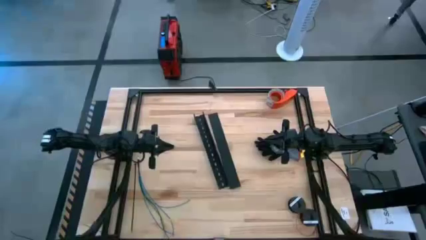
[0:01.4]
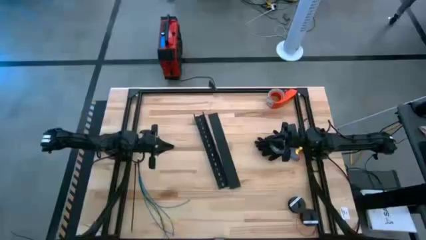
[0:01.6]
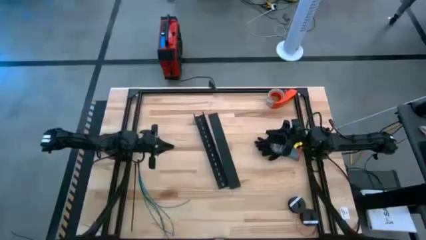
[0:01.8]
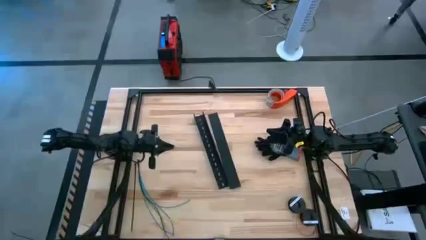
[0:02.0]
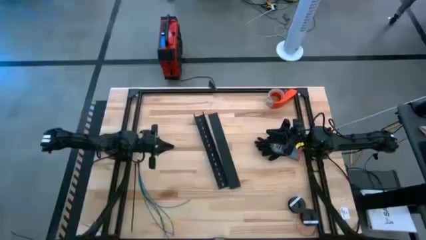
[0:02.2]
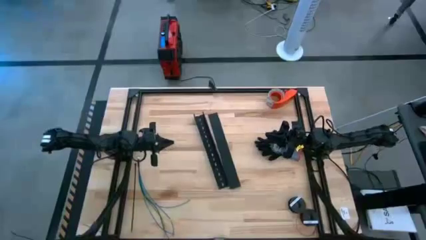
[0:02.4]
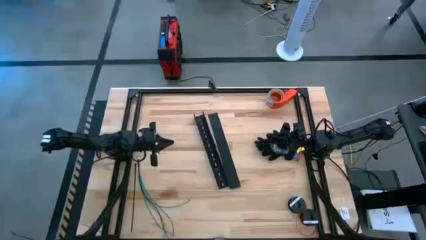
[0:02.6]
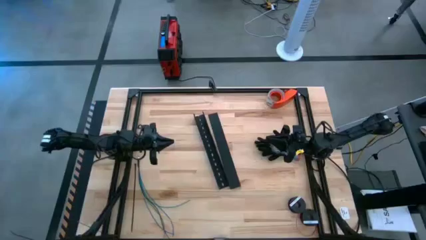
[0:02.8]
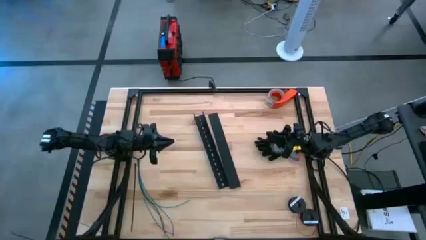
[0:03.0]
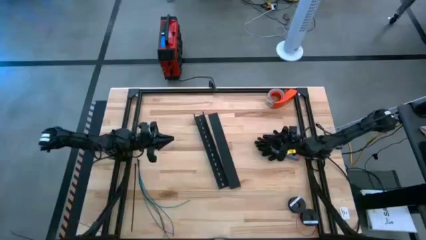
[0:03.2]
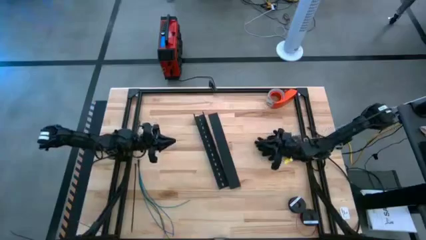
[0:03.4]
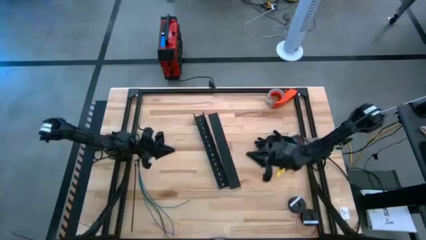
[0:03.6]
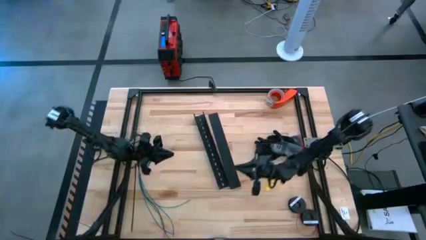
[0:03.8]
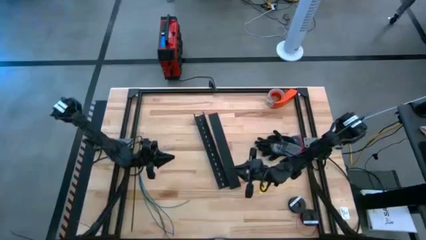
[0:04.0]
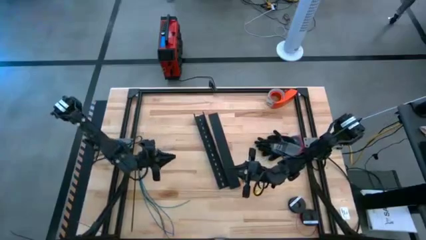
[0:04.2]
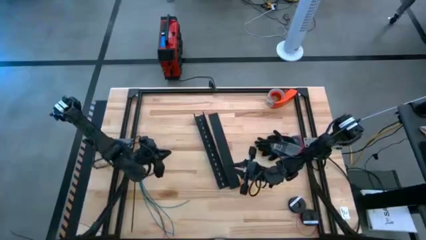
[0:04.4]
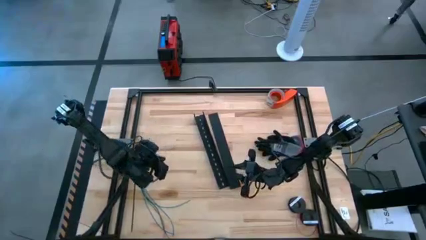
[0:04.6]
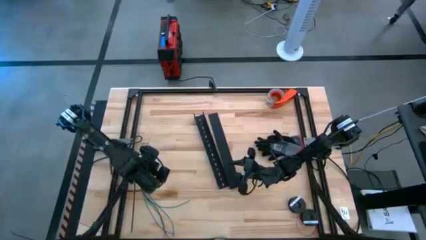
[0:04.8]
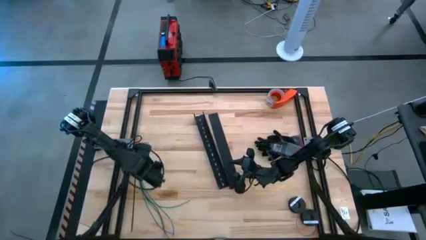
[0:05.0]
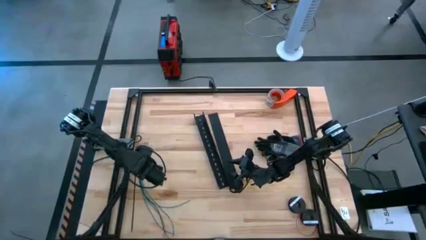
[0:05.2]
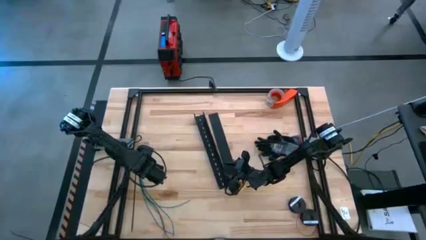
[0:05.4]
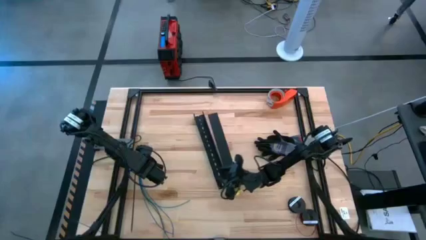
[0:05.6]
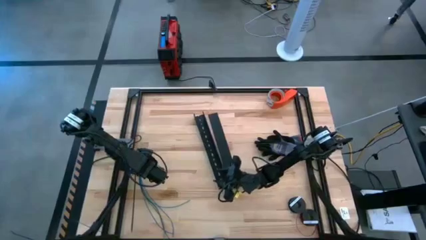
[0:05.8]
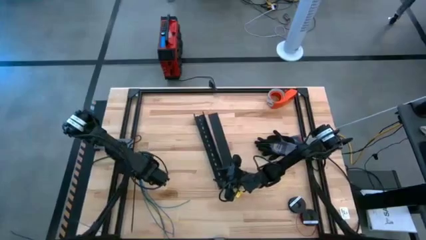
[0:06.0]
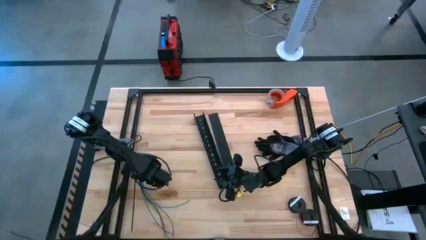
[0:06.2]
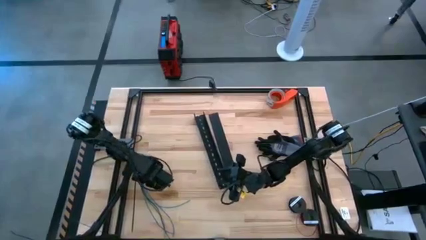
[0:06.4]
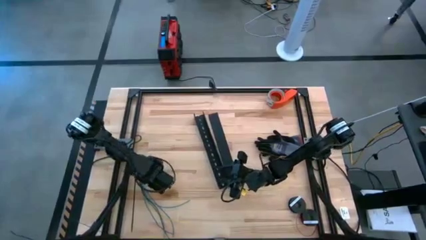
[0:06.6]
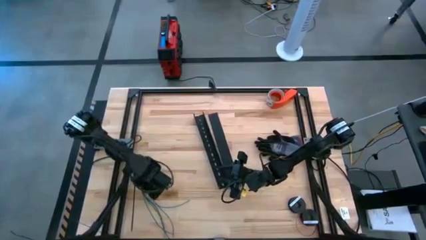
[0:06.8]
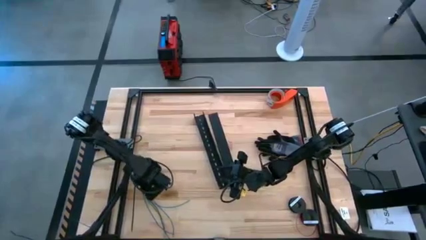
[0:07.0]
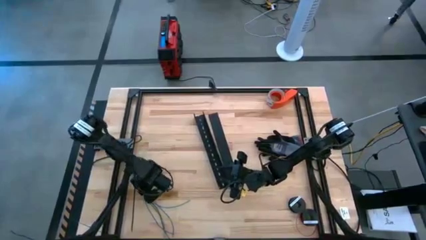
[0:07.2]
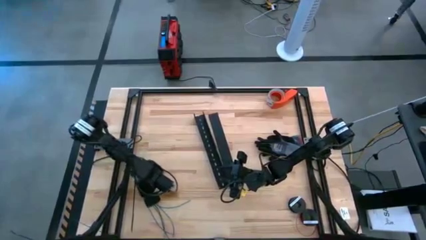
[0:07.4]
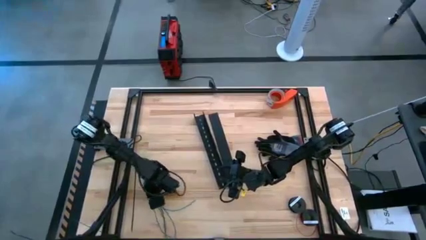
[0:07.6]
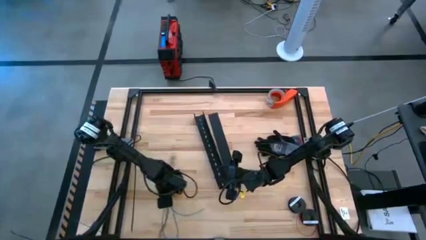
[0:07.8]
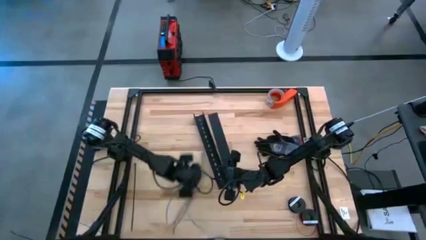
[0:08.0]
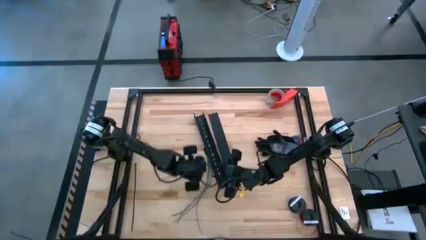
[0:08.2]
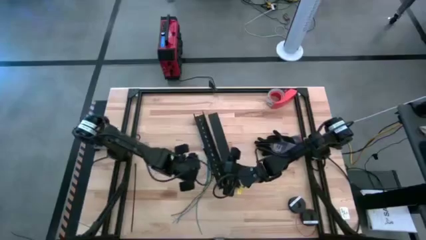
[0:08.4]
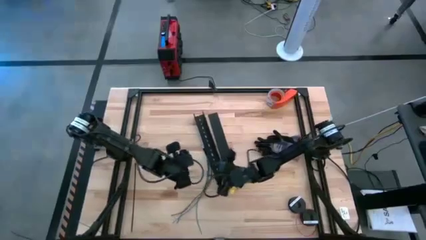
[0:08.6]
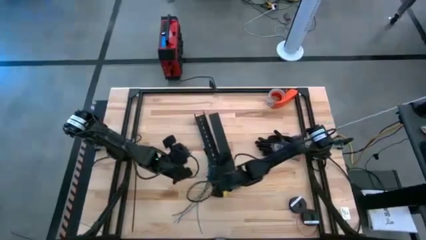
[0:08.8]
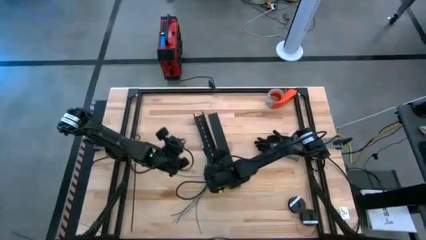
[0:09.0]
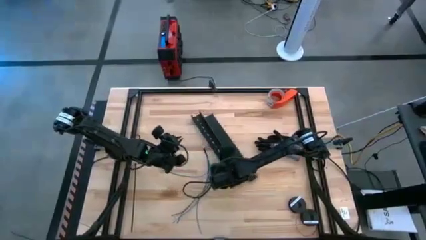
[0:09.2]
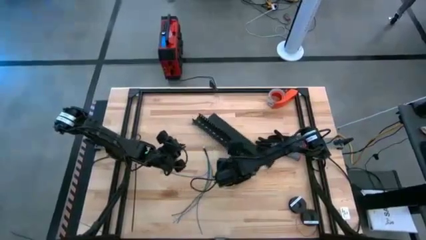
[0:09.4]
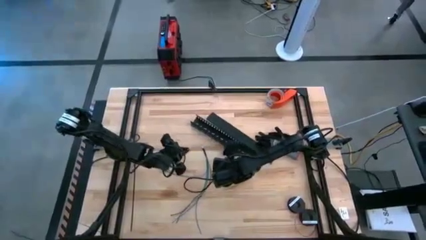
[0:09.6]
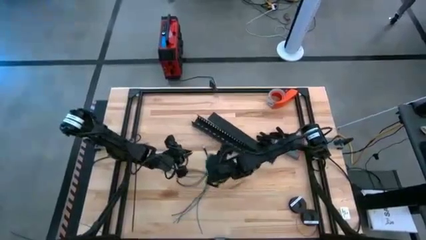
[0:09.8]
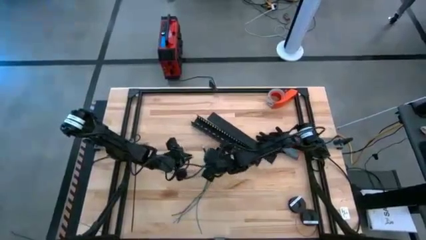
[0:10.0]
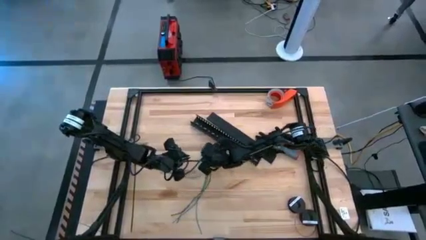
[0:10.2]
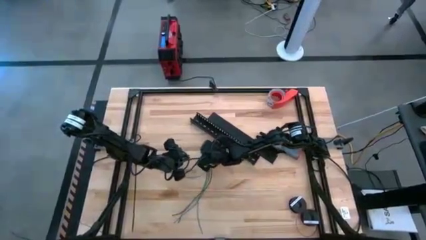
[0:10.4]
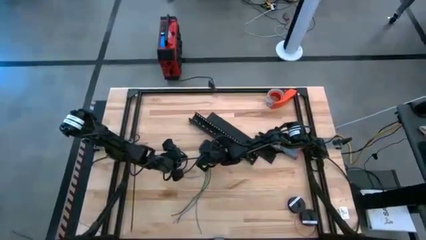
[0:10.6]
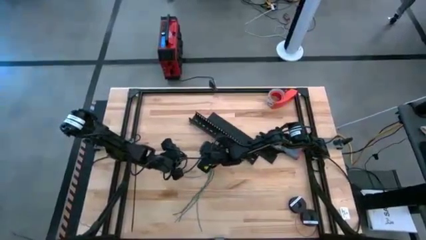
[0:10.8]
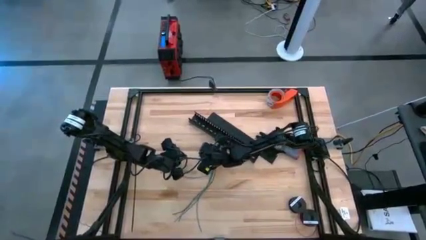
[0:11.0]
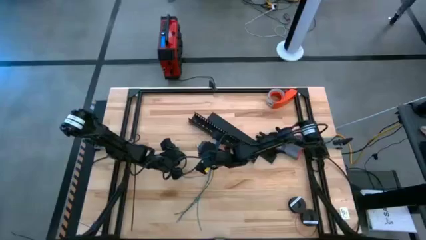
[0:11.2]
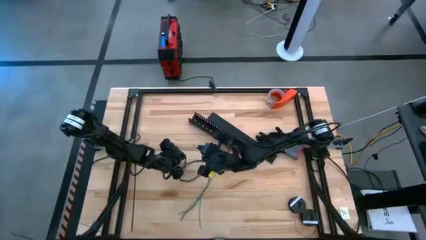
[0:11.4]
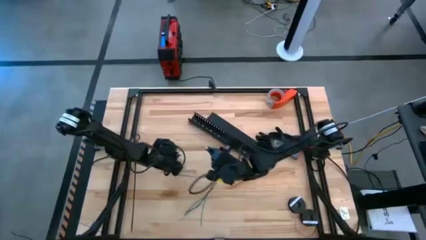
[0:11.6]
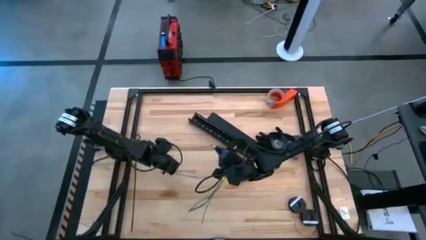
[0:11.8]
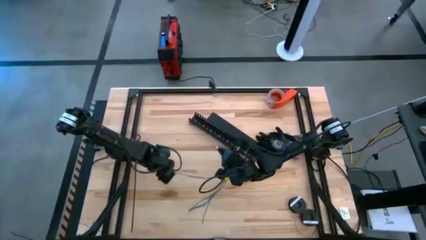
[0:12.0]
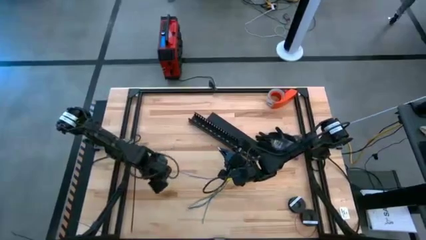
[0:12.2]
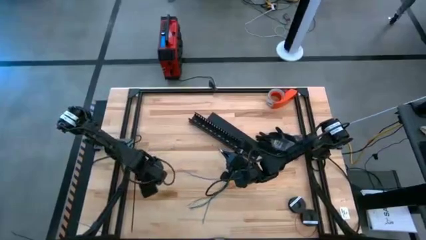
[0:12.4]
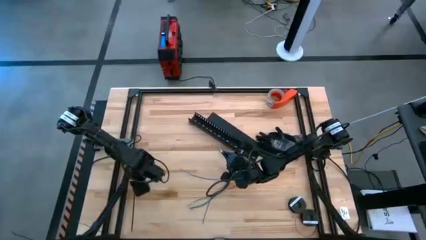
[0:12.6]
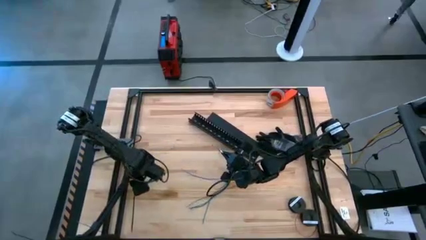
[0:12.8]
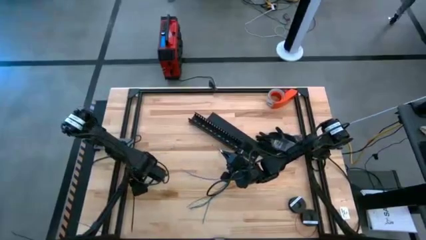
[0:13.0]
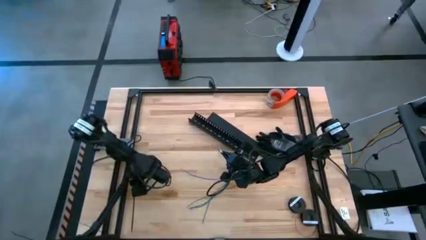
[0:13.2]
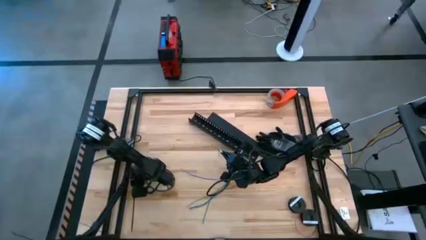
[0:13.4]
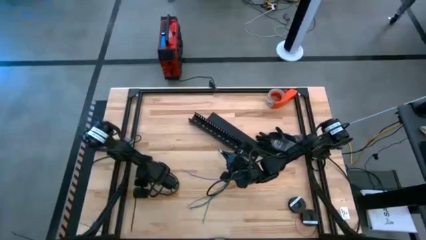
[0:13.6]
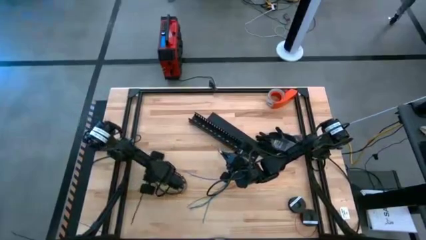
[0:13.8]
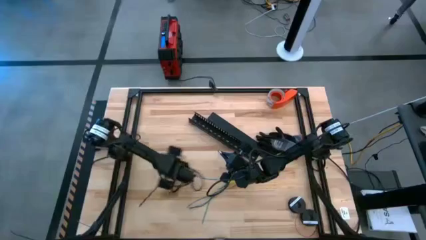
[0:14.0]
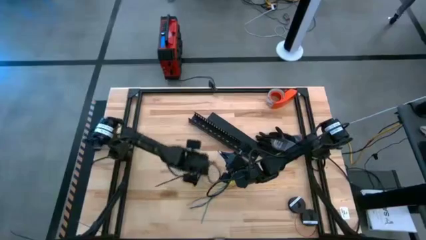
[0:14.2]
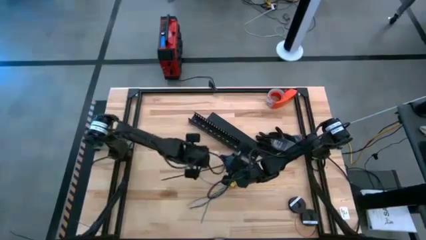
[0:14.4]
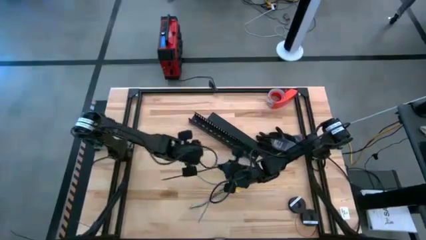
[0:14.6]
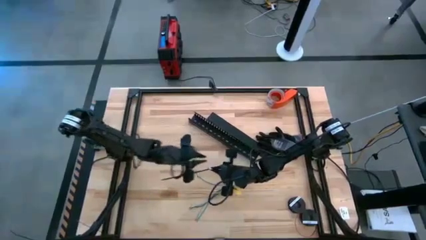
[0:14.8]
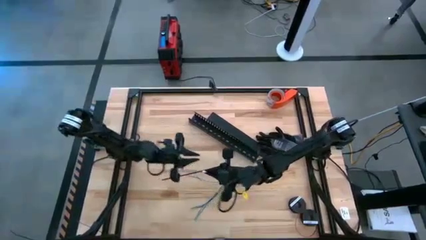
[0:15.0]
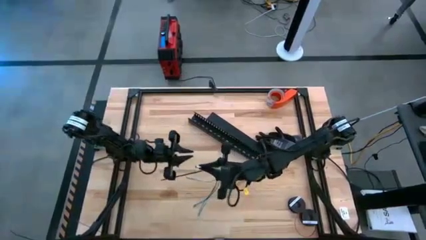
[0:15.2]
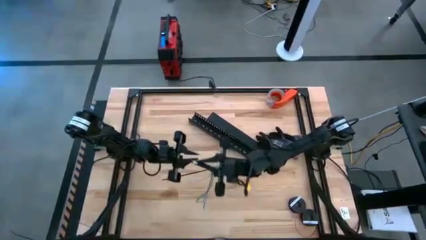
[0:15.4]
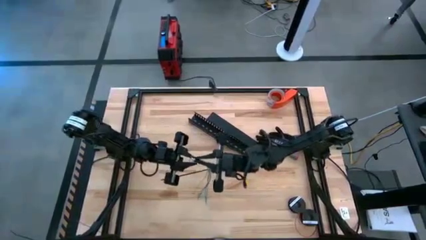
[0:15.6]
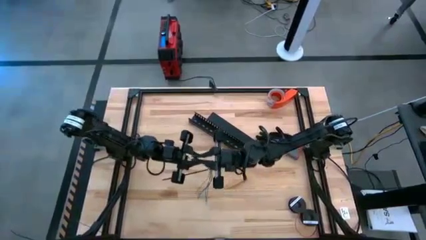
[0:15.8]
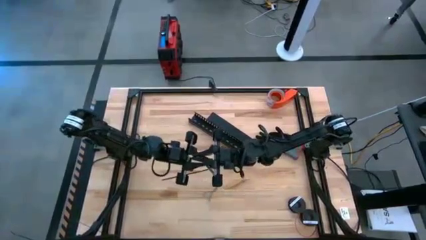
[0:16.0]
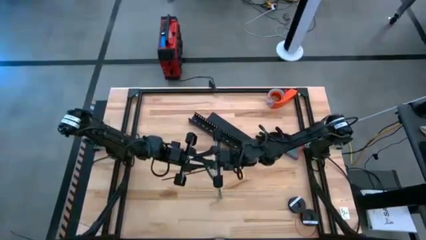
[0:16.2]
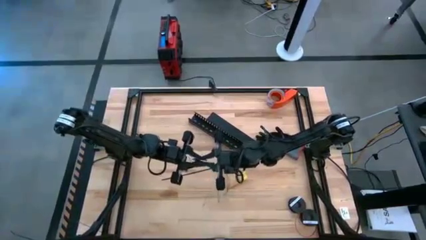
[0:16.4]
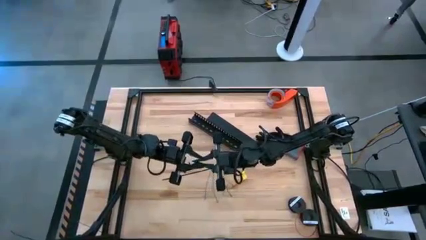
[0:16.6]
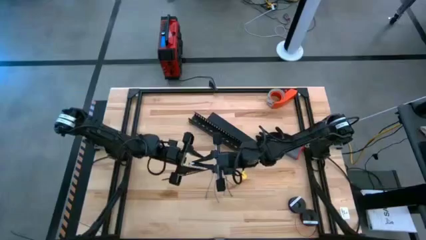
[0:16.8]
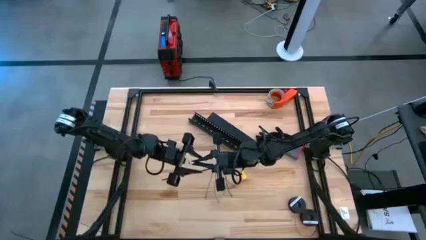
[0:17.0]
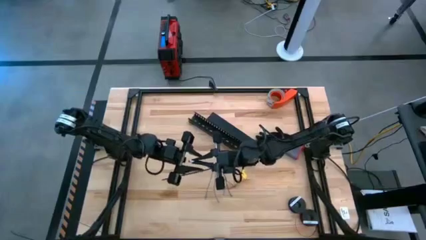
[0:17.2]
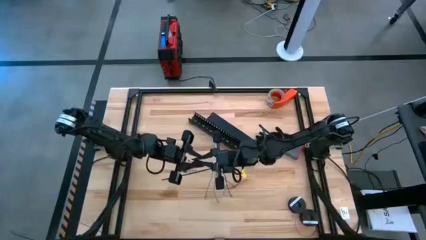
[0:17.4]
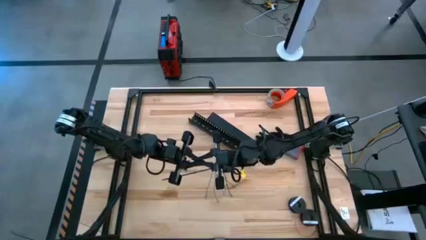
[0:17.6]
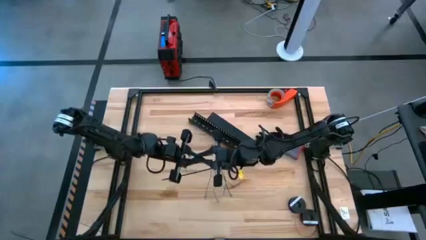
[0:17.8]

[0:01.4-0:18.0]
Task: Ziptie cables
Wrap the zip tie around the cable bundle
